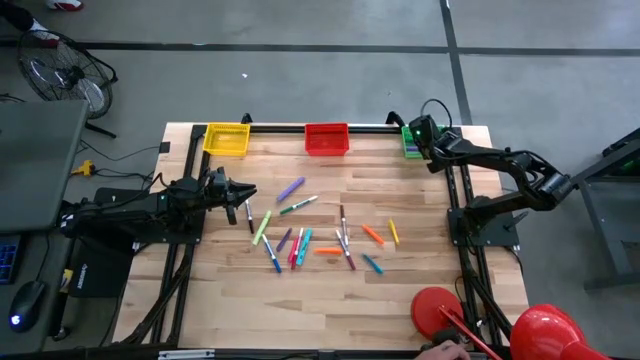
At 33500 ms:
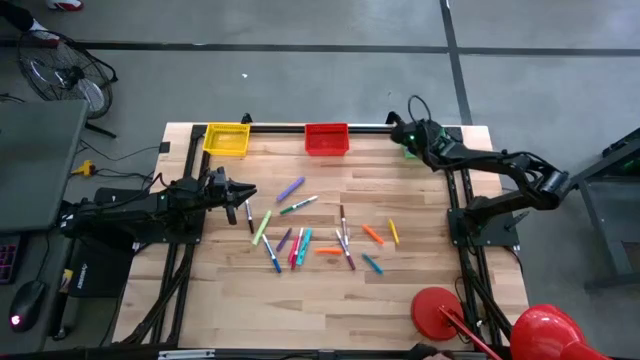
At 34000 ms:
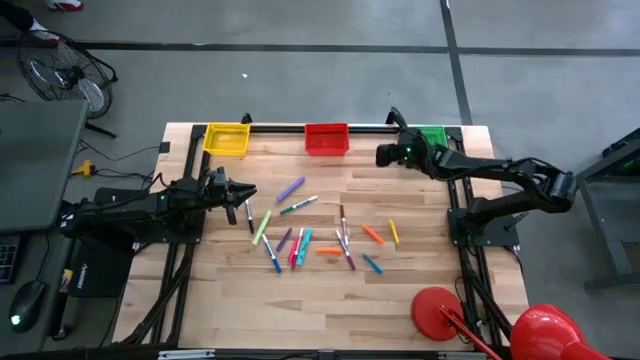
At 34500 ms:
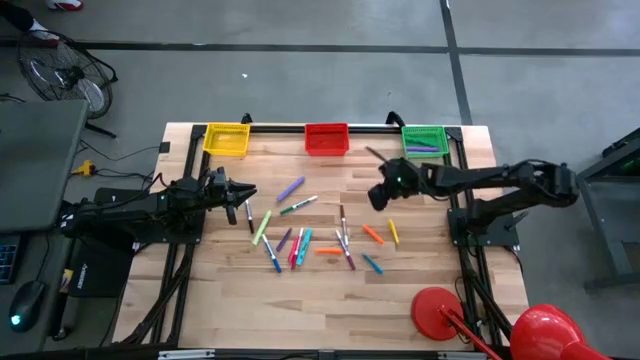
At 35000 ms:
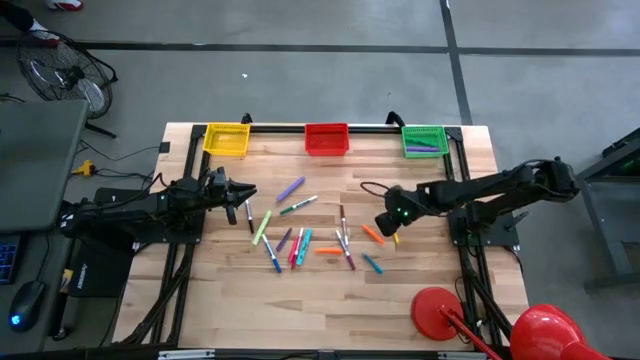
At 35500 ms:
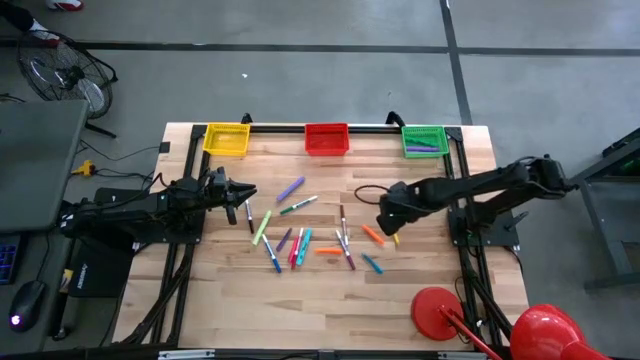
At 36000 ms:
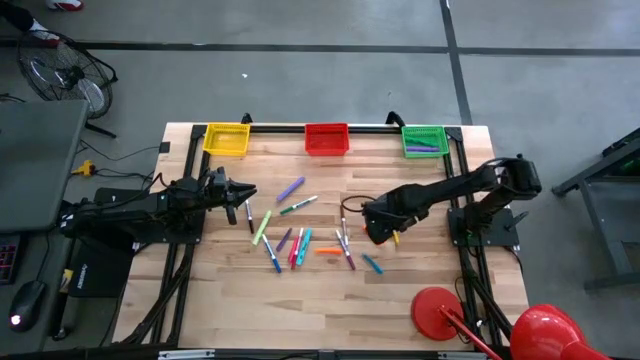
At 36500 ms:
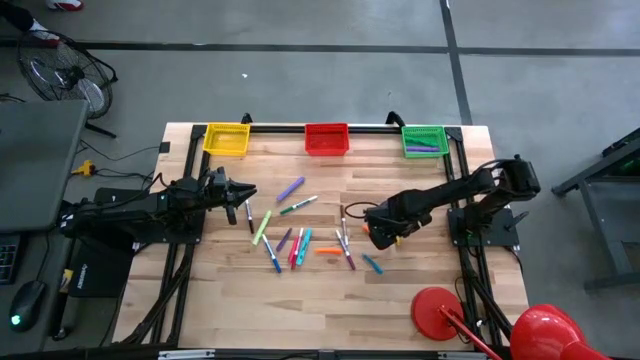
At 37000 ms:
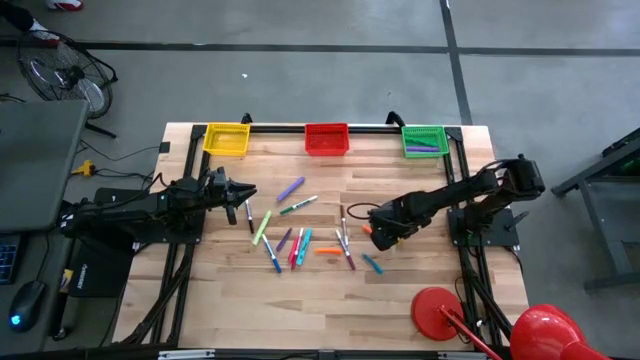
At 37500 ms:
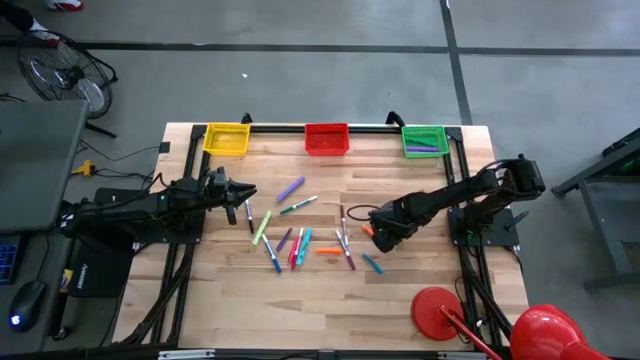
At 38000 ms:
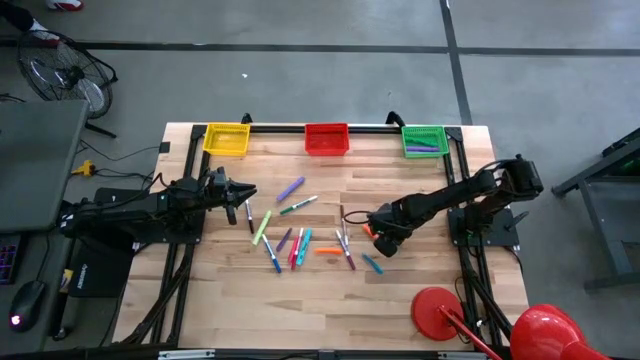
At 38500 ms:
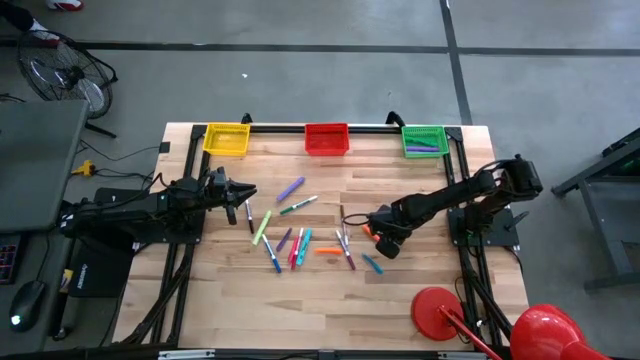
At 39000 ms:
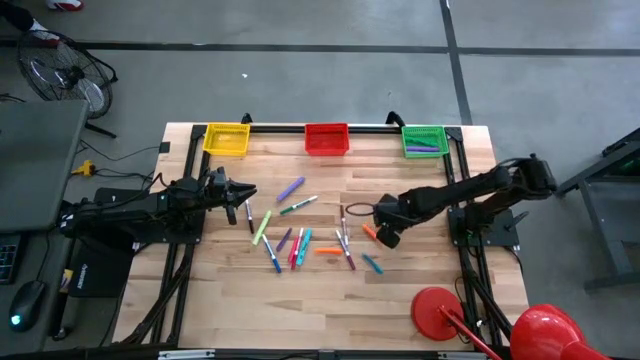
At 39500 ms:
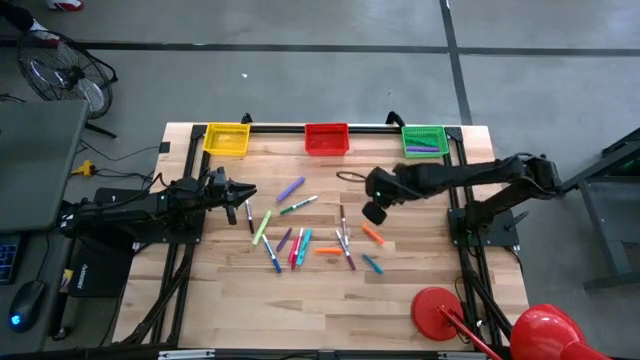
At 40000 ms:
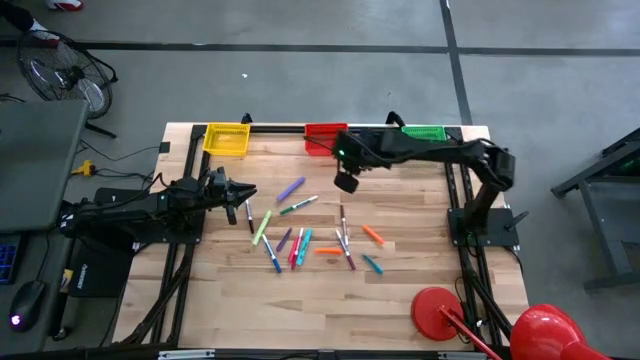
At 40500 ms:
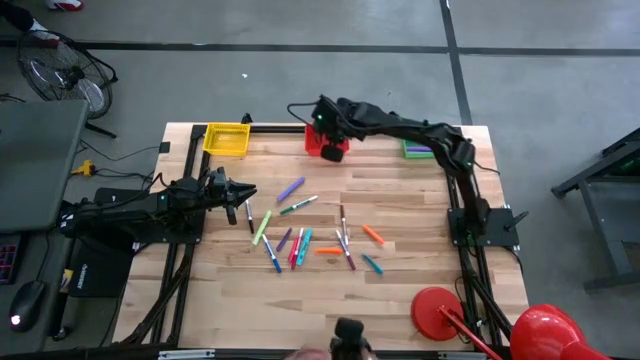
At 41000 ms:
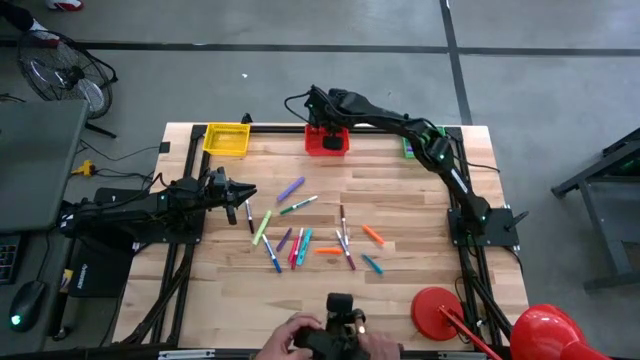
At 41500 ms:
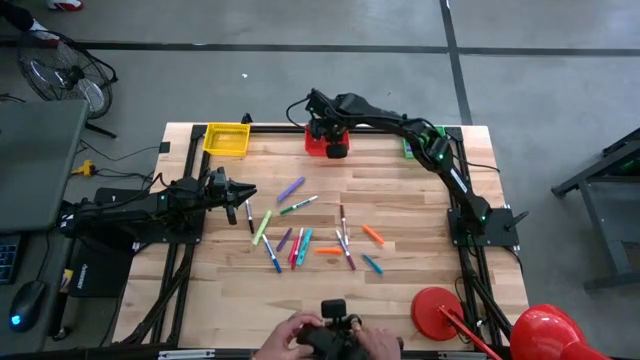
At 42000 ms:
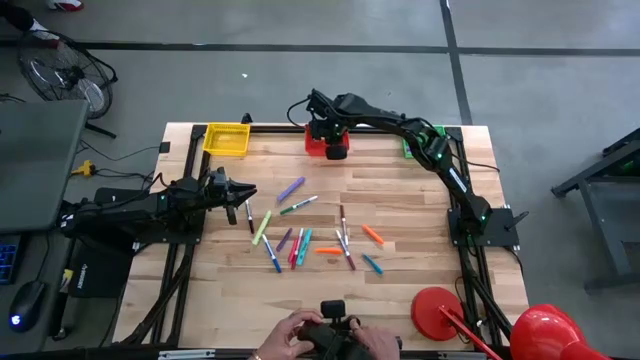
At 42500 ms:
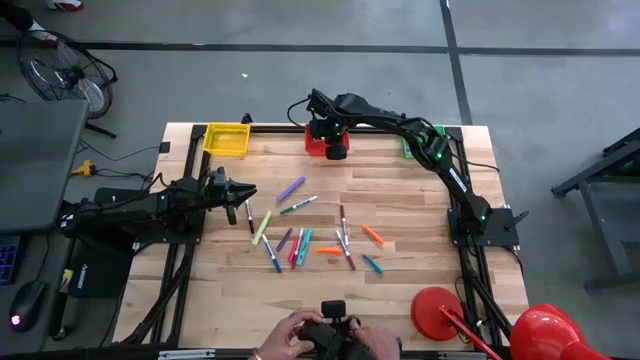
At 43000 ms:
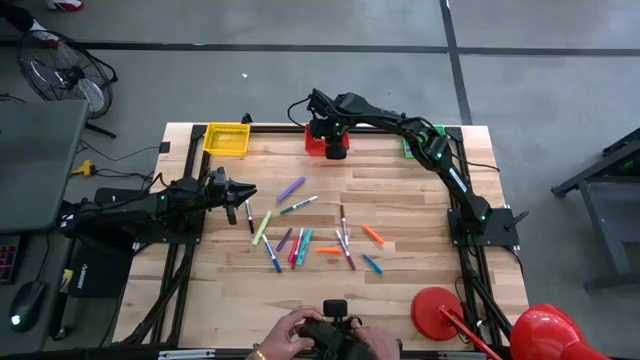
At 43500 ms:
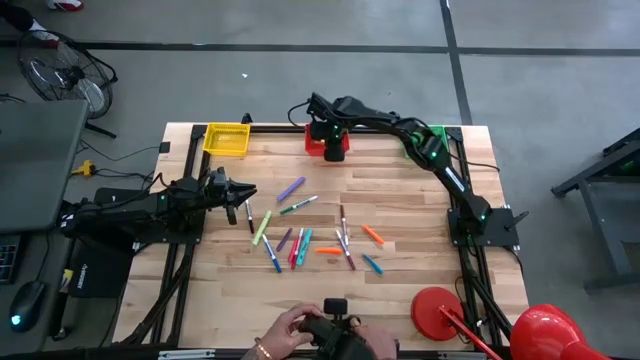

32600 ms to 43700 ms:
Task: Pick & Place Markers
Put the yellow pen into the red bin

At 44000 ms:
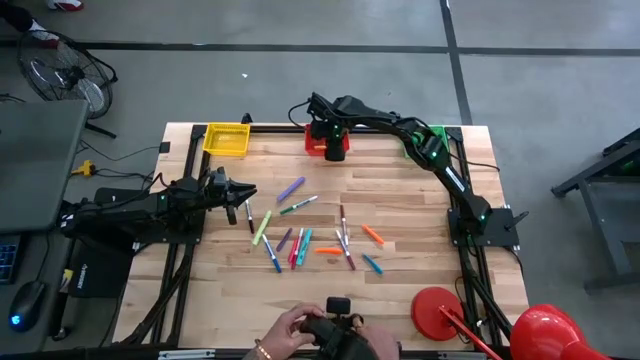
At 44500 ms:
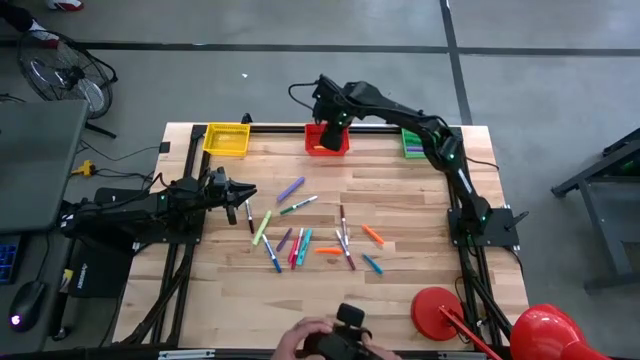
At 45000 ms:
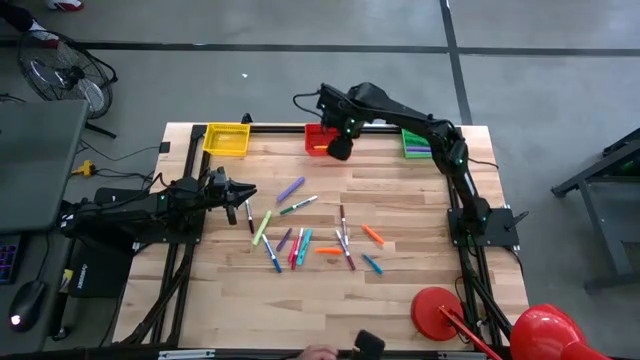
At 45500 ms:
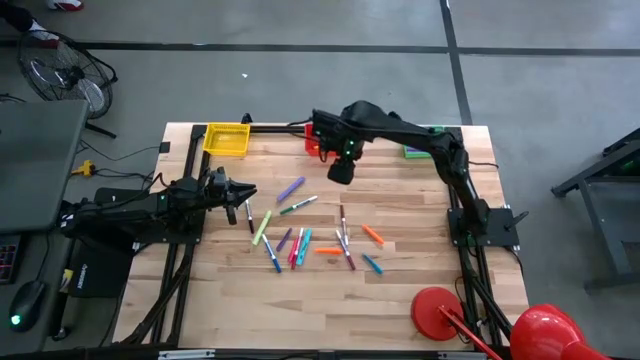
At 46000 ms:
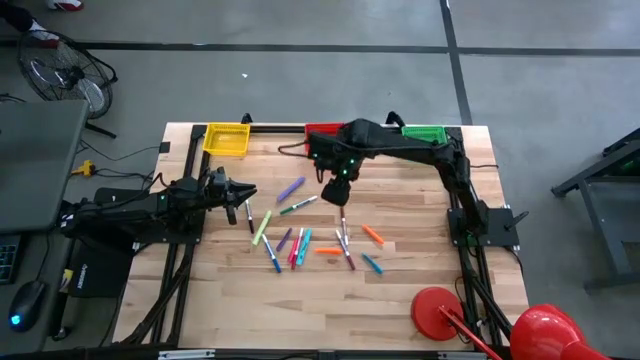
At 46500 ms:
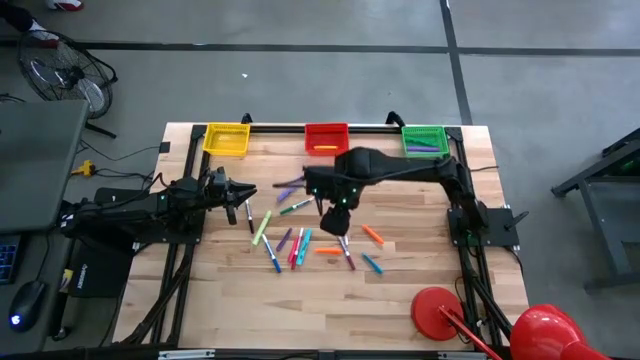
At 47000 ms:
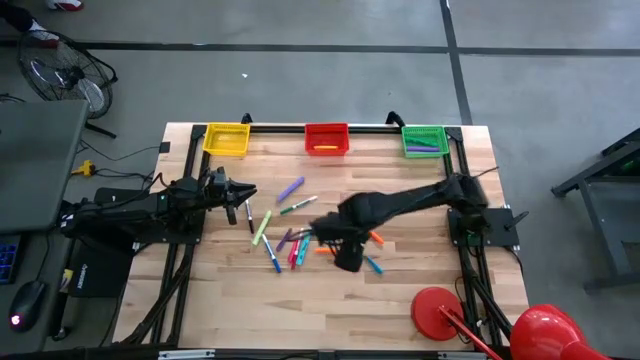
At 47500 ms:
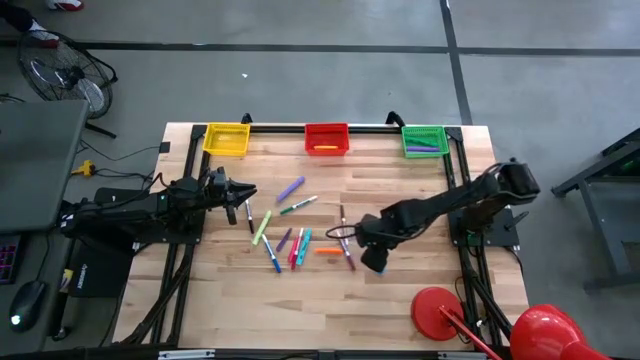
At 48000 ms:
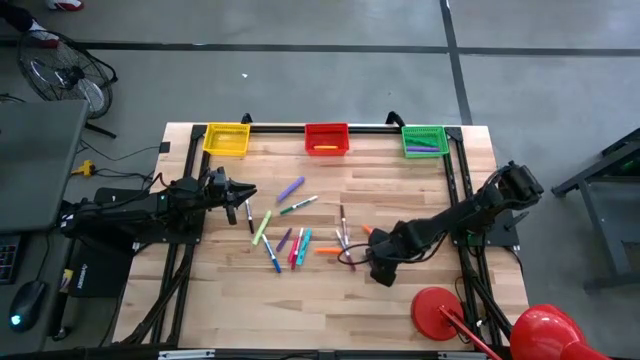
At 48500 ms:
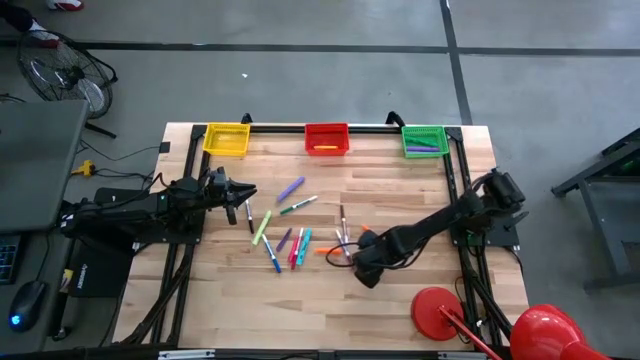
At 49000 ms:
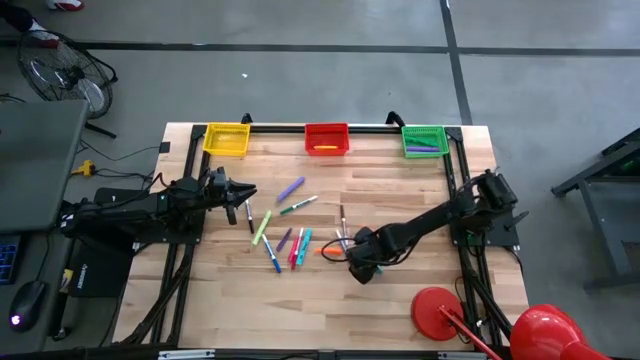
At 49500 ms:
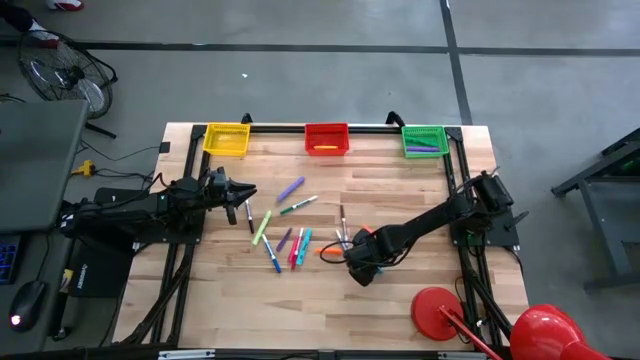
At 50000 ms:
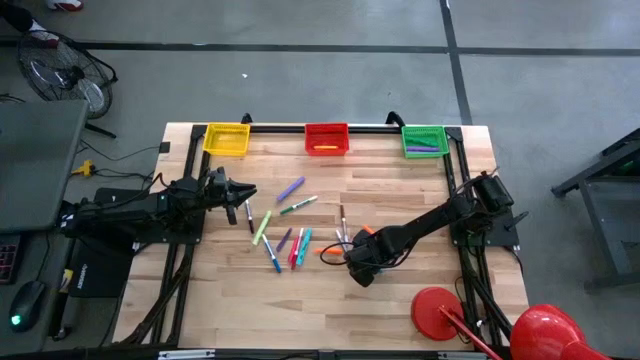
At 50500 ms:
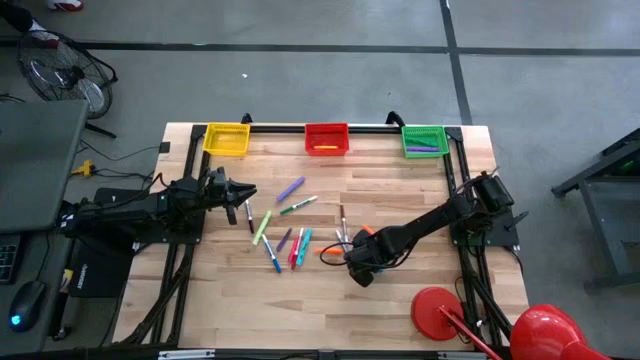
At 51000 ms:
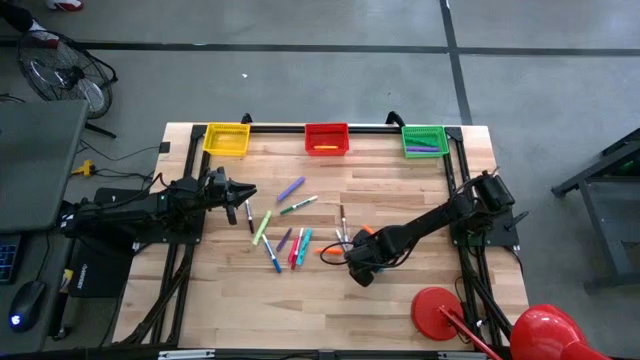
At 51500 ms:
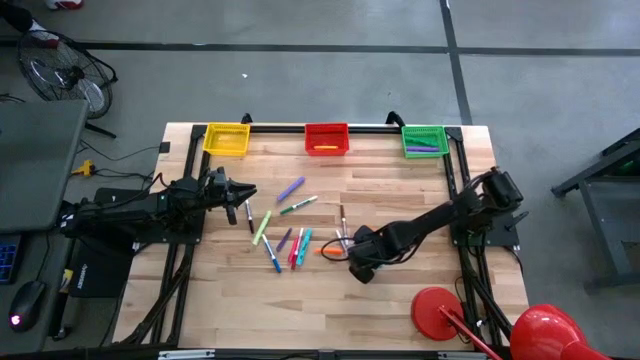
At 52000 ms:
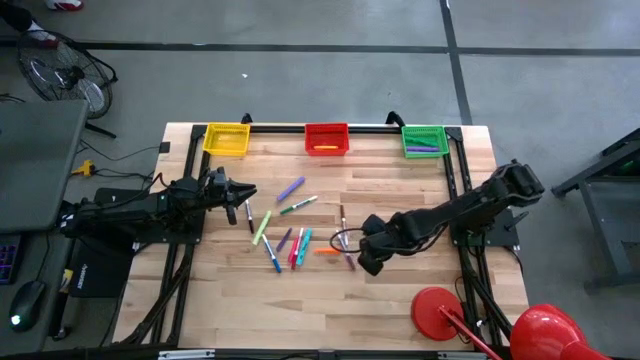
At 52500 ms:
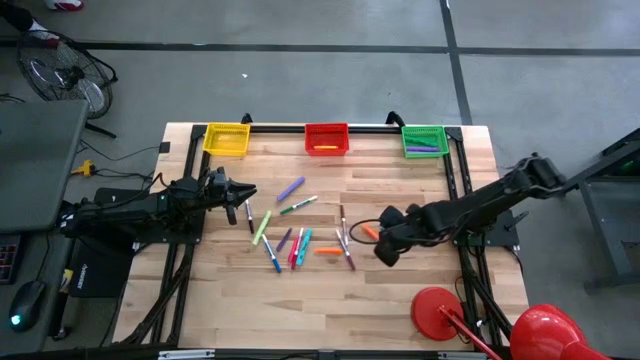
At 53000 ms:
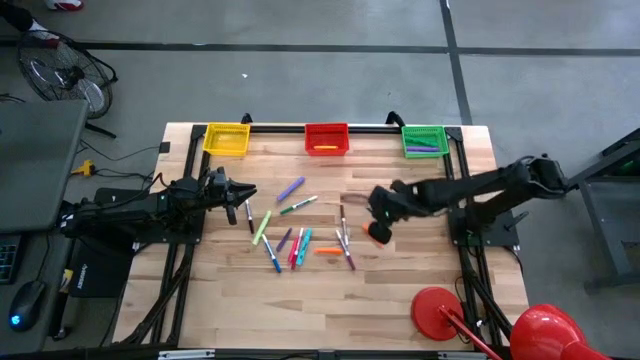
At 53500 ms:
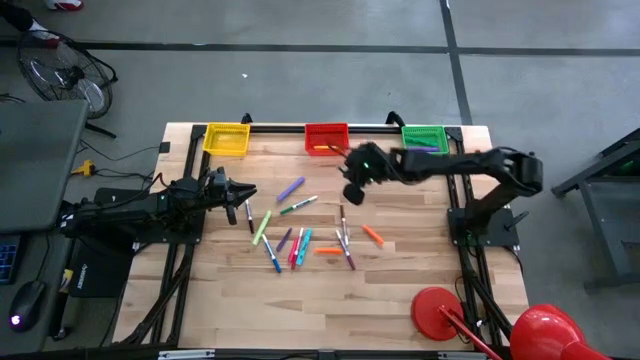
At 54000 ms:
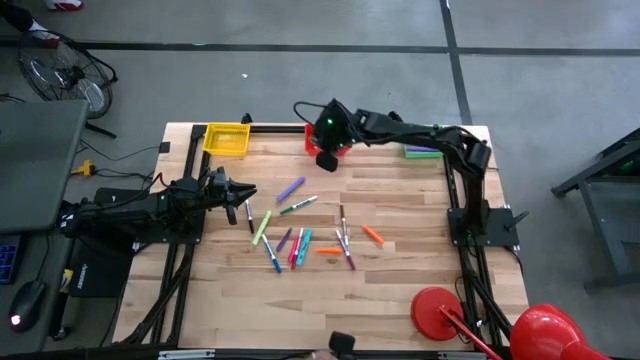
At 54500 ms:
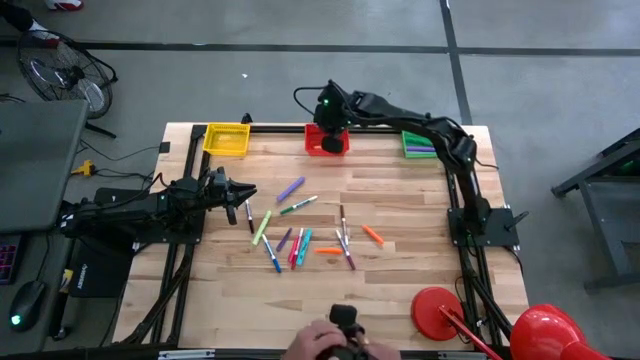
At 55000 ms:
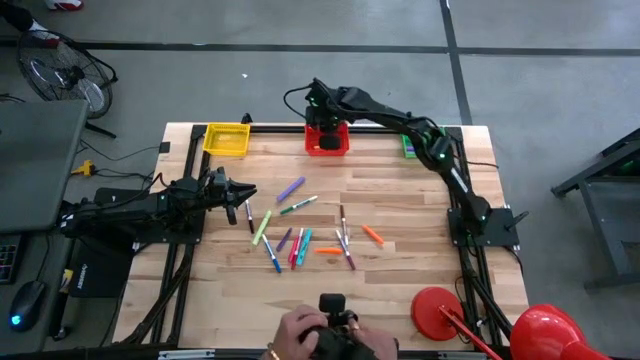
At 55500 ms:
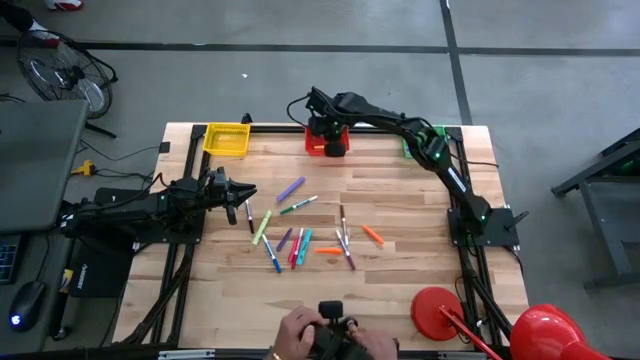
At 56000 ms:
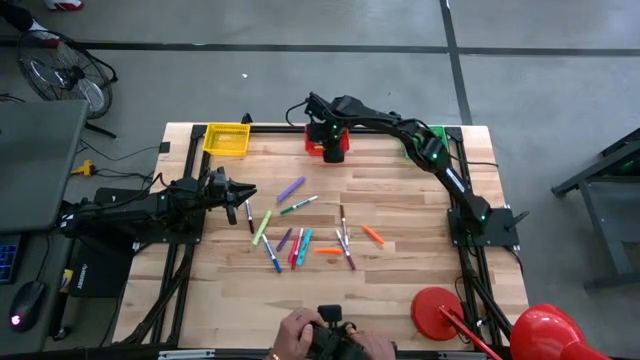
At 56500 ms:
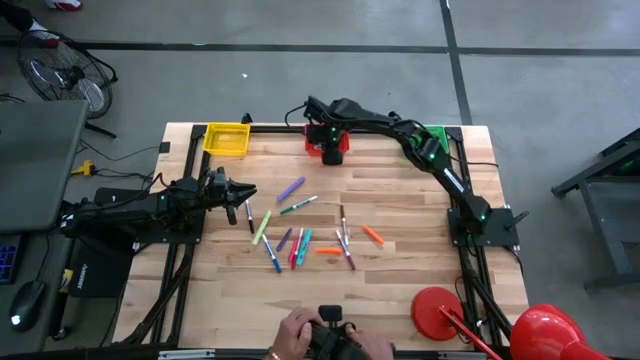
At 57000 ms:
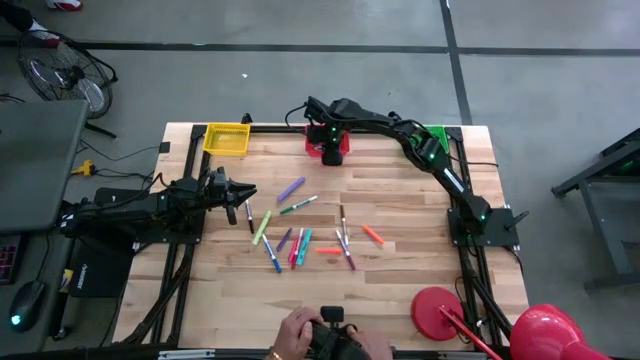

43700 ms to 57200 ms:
Put the blue pen into the red bin
